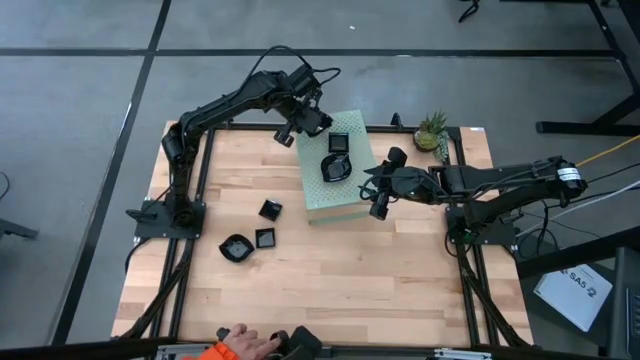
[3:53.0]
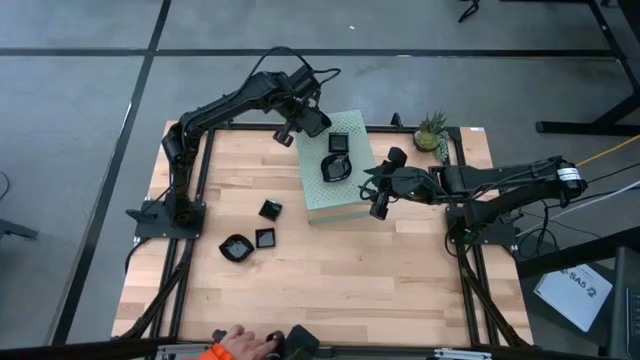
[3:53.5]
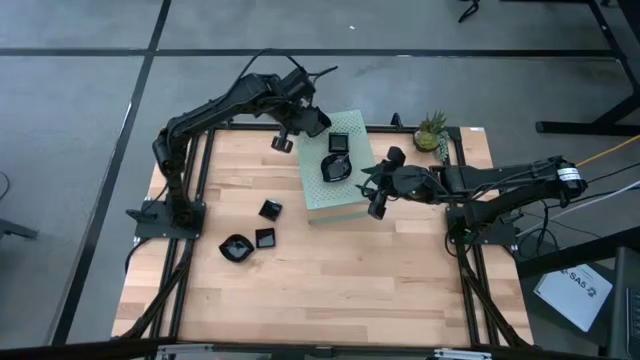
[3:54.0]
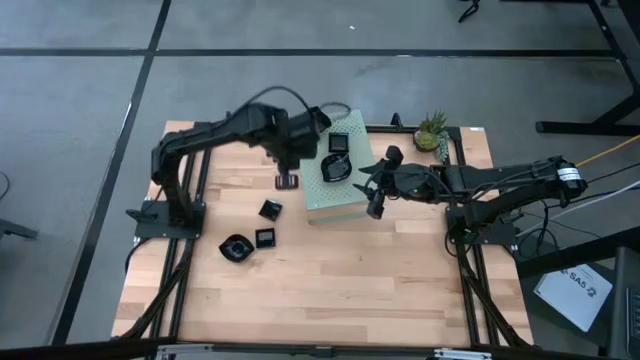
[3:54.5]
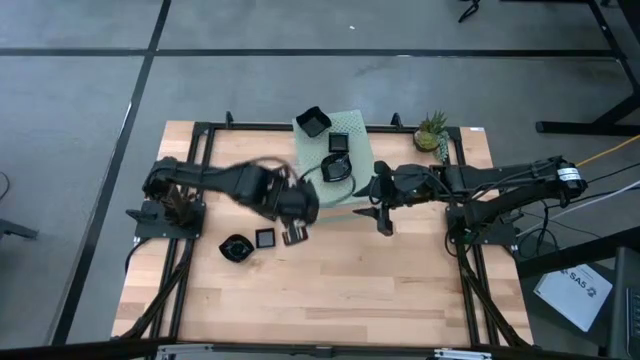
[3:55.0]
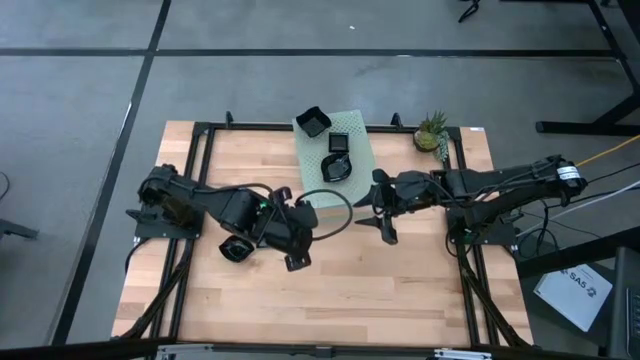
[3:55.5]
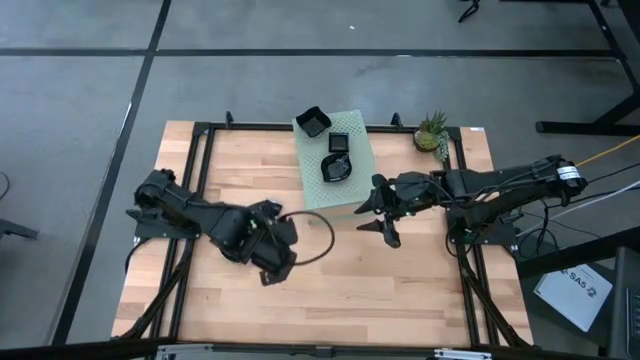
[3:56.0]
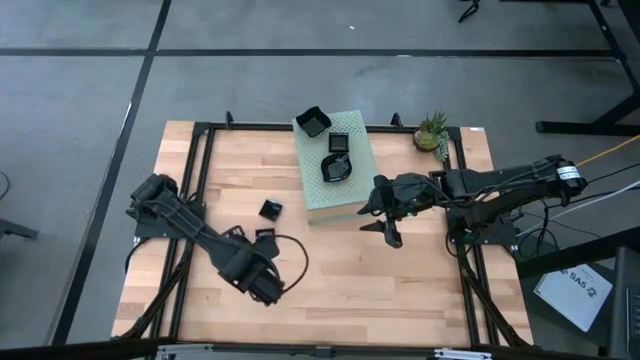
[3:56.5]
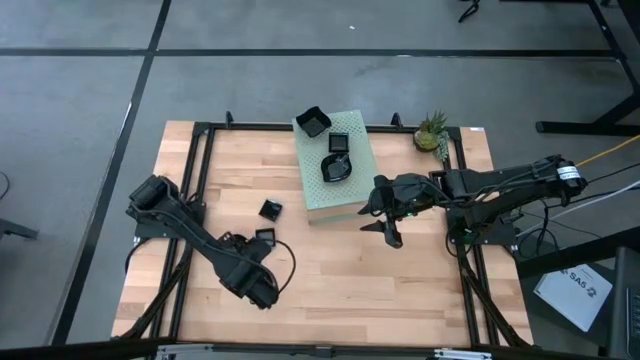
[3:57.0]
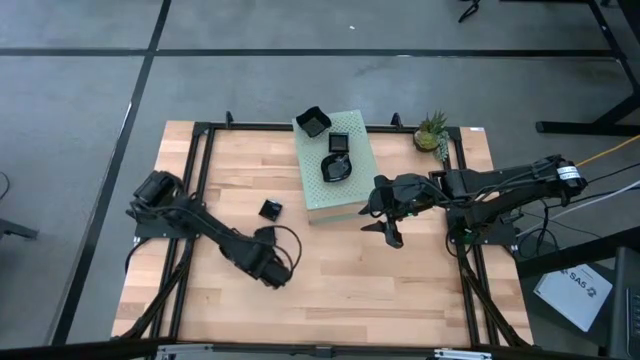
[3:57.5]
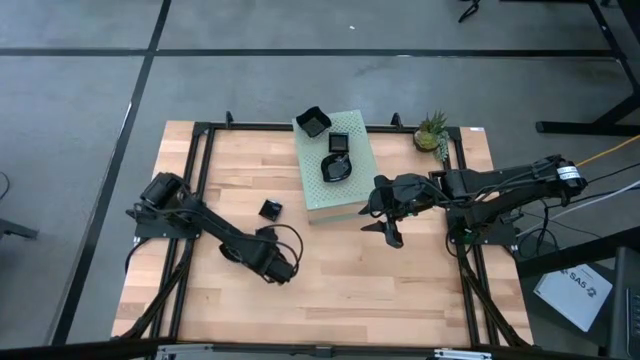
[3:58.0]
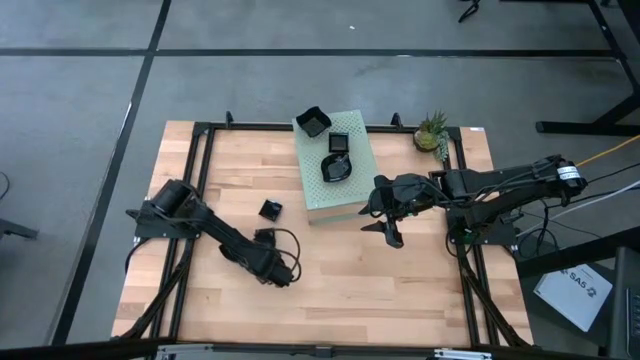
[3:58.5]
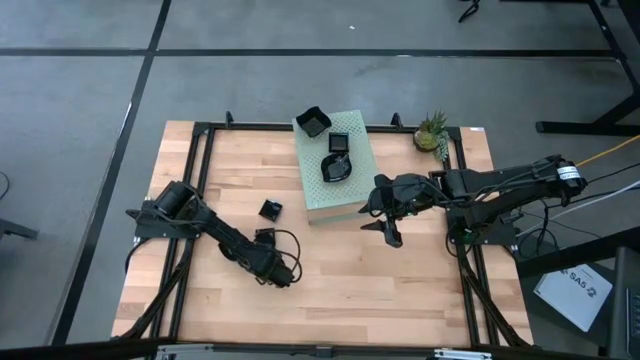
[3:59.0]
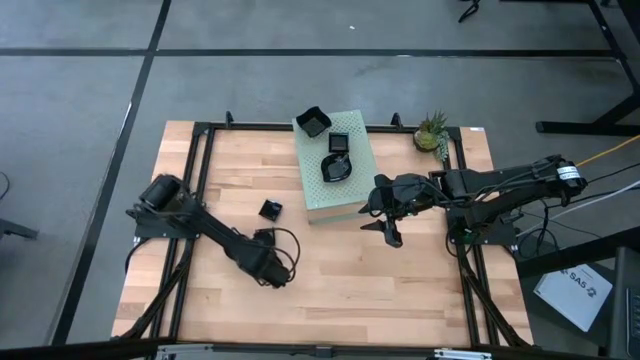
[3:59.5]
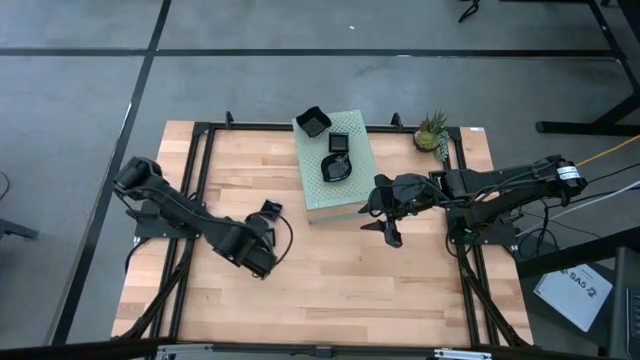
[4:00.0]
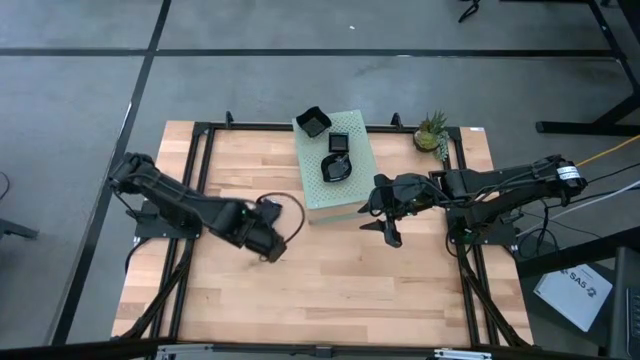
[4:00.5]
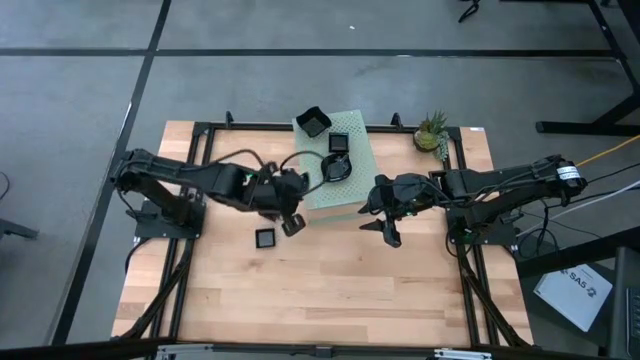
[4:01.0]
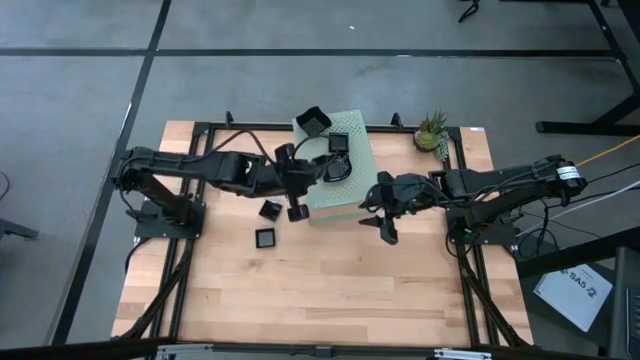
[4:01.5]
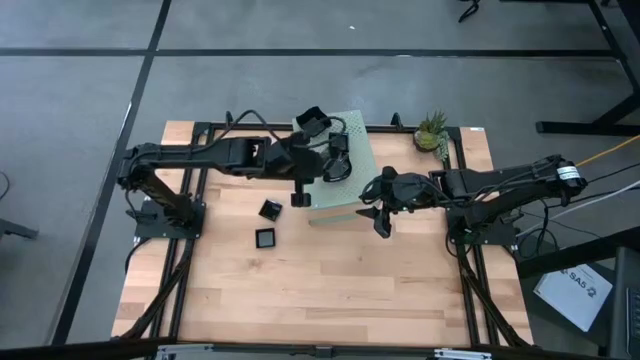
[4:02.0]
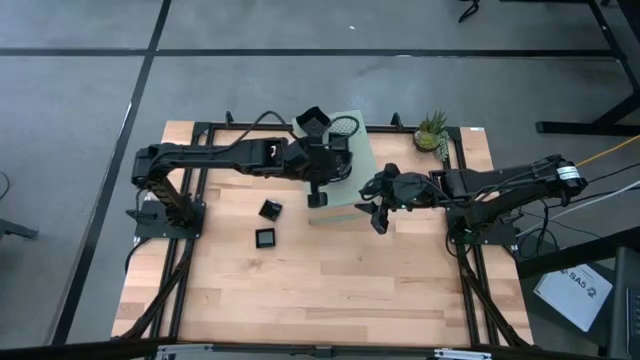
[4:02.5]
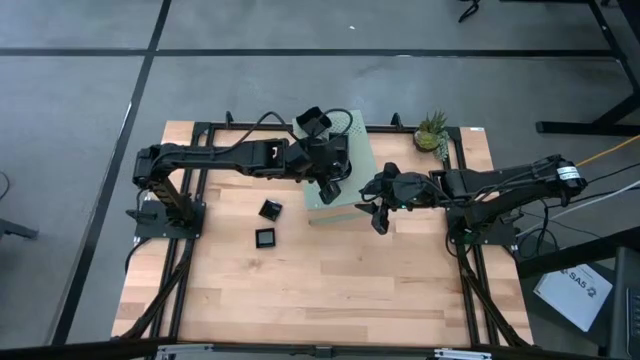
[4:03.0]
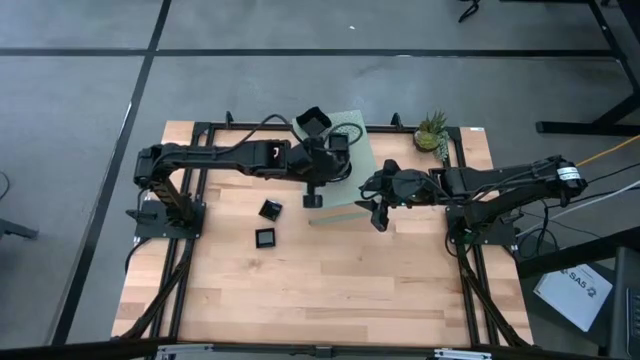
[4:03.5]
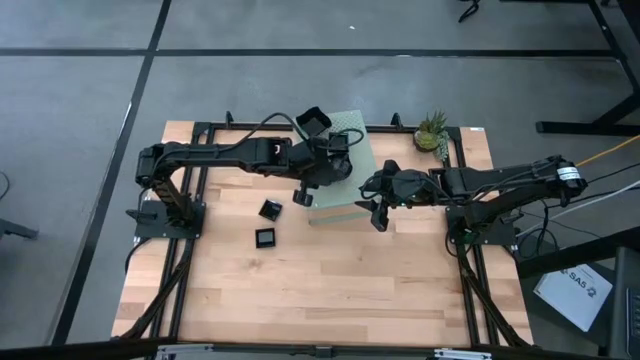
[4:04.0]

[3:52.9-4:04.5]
Task: Pick & Place Mini shaped plates
Stack the black leaf shaped plate on top of the black leaf shape plates on the shelf

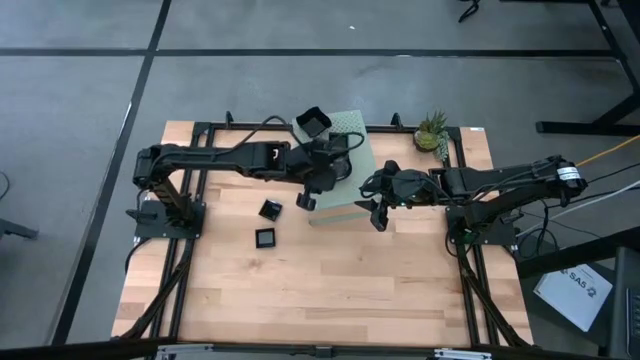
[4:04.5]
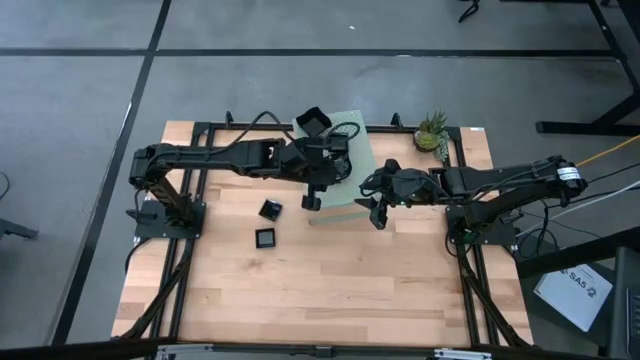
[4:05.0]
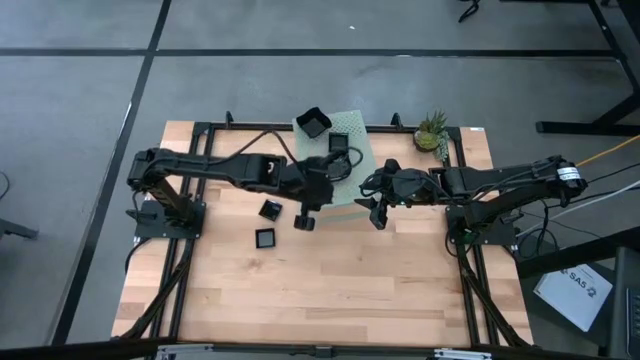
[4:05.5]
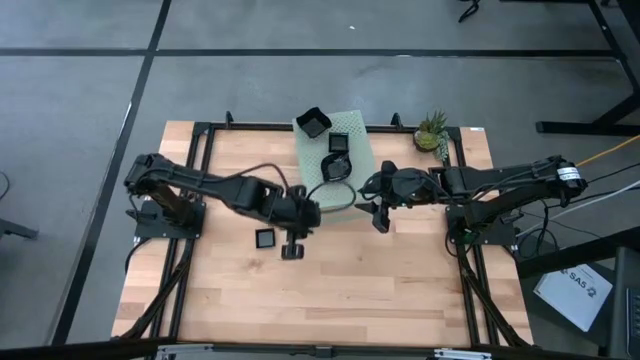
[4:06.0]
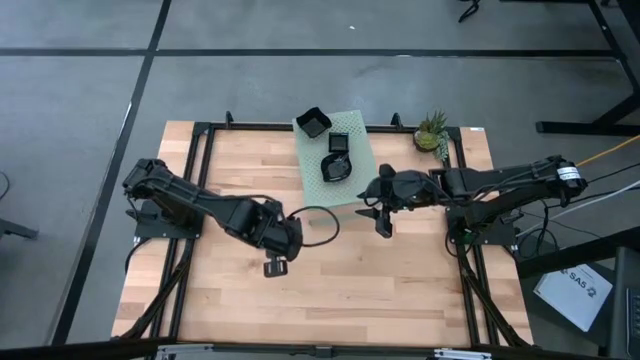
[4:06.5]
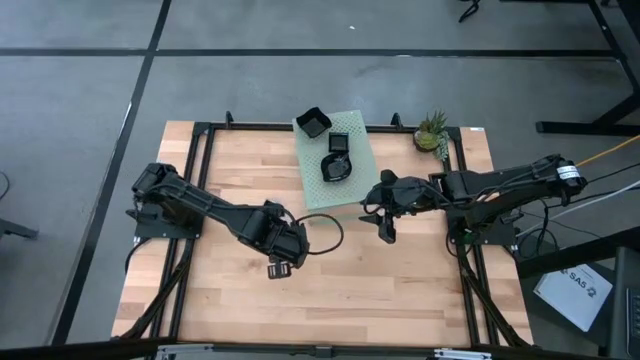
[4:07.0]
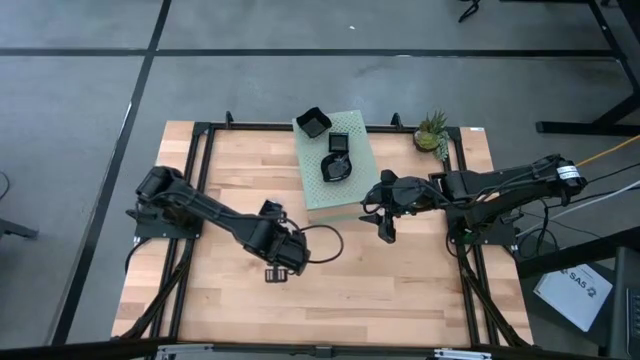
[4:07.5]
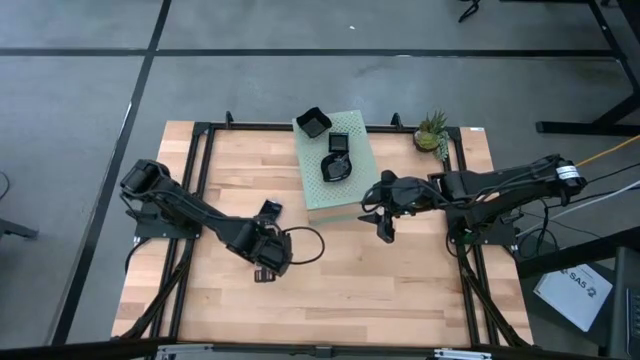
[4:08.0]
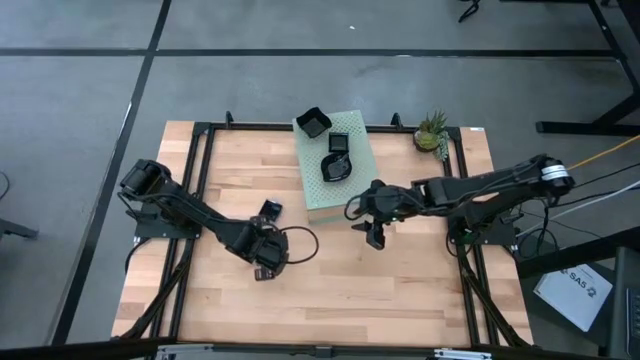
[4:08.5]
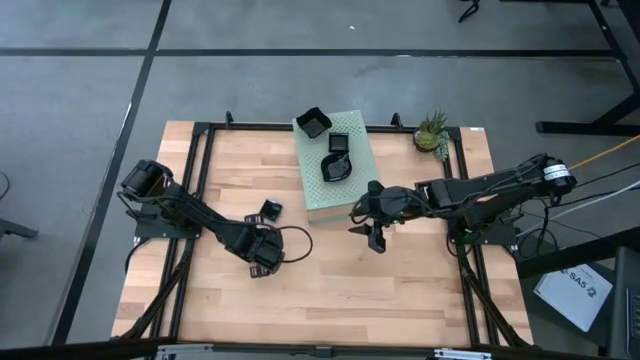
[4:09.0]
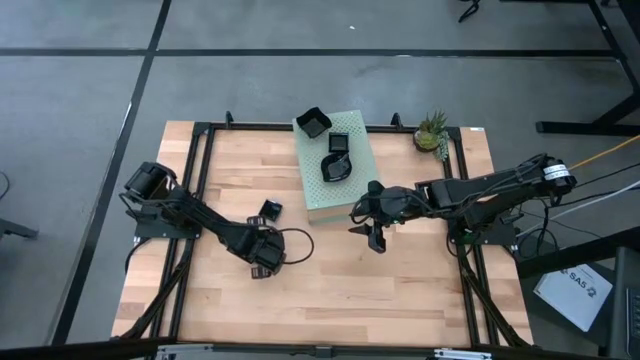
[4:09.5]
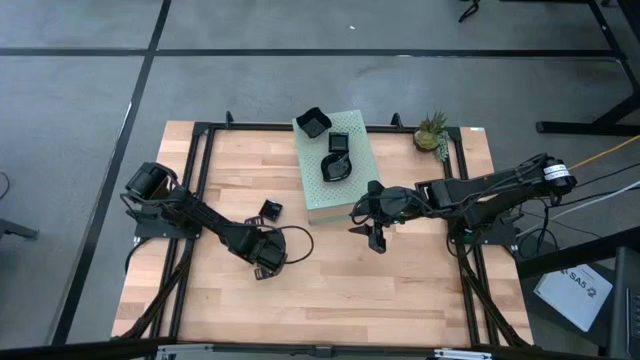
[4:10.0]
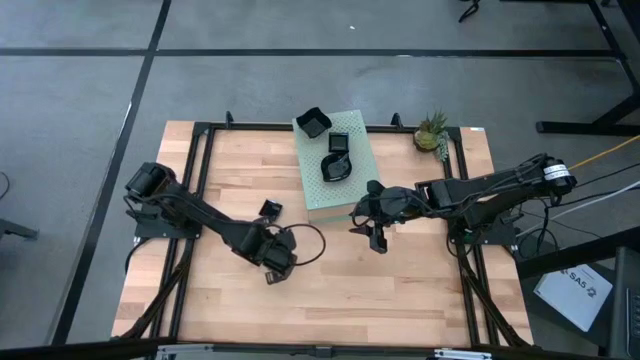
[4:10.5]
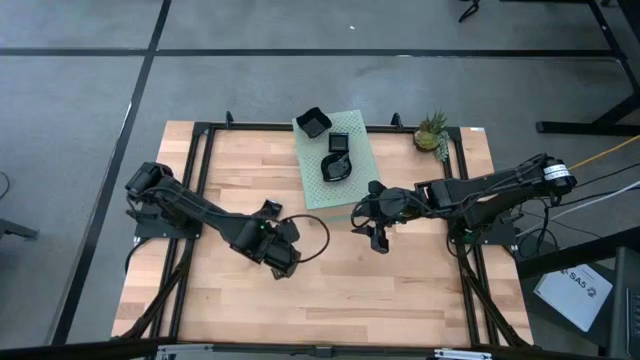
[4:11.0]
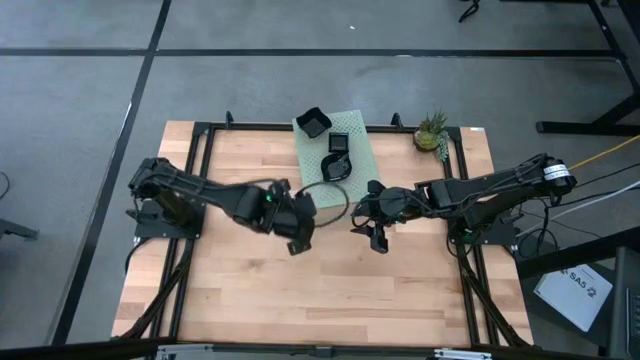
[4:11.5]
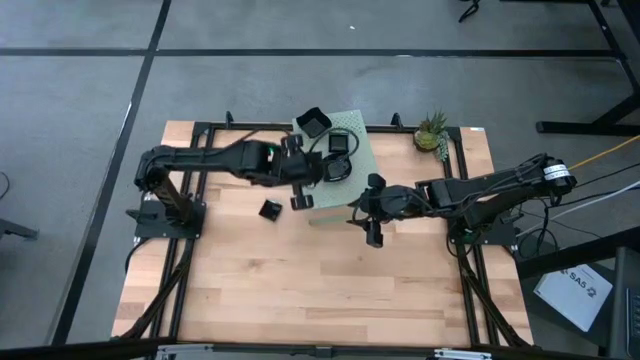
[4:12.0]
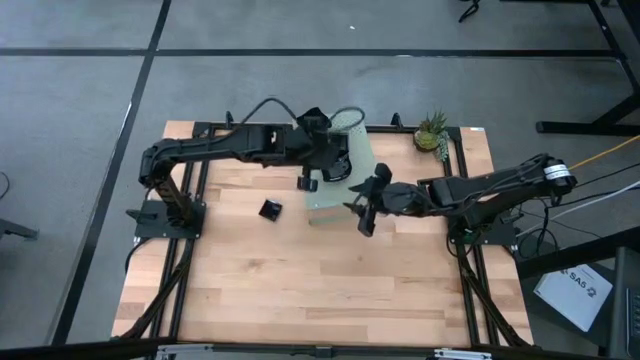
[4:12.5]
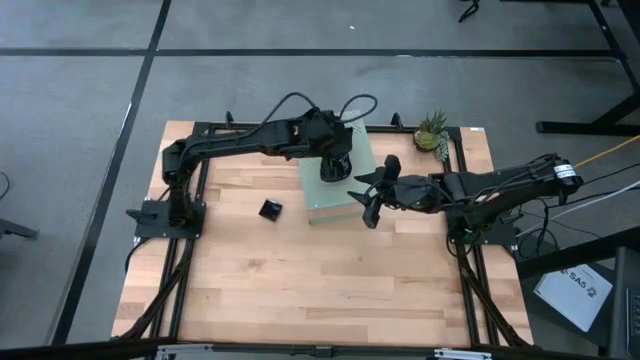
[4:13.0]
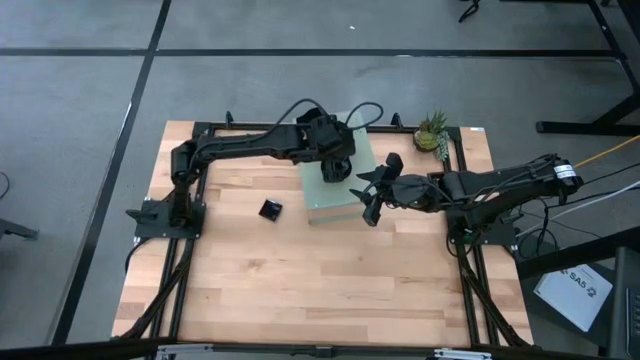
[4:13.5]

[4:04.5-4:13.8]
Stack the black square plate on top of the black square plates on the shelf
